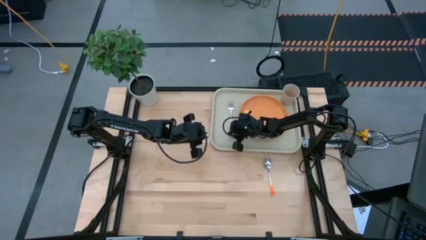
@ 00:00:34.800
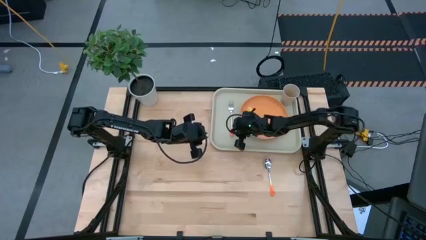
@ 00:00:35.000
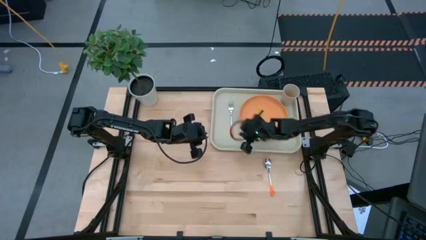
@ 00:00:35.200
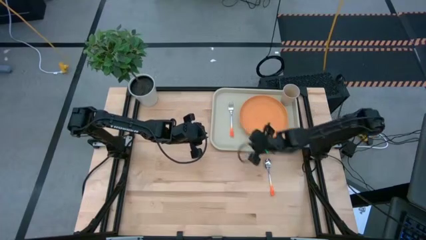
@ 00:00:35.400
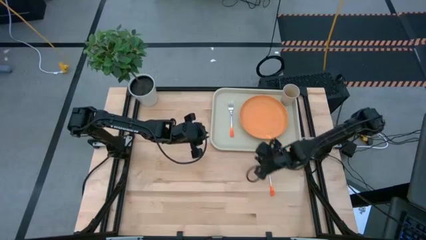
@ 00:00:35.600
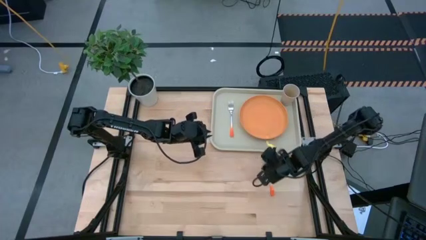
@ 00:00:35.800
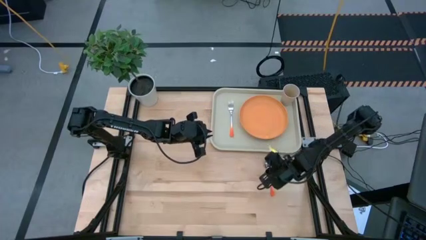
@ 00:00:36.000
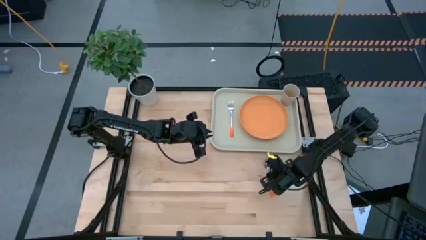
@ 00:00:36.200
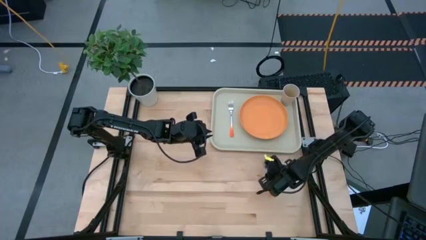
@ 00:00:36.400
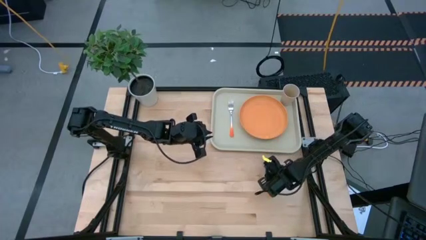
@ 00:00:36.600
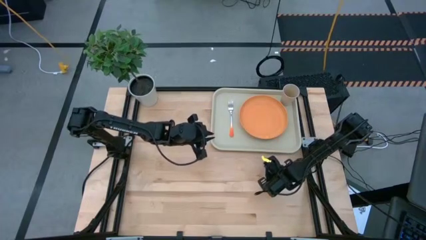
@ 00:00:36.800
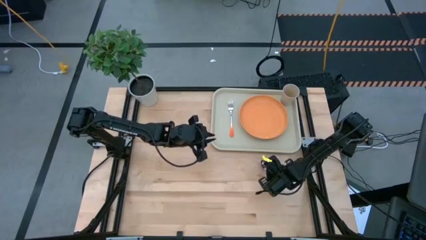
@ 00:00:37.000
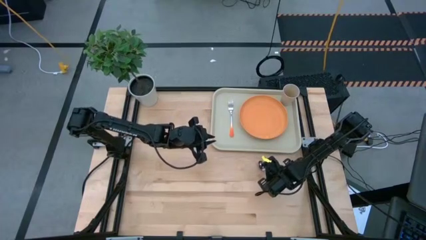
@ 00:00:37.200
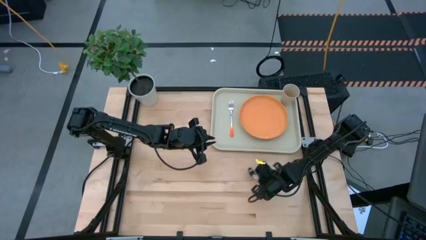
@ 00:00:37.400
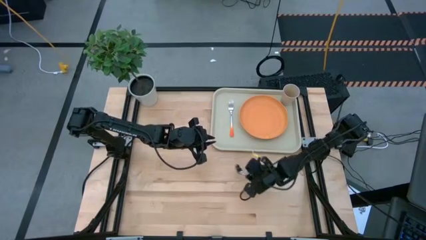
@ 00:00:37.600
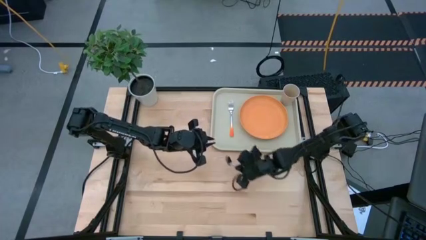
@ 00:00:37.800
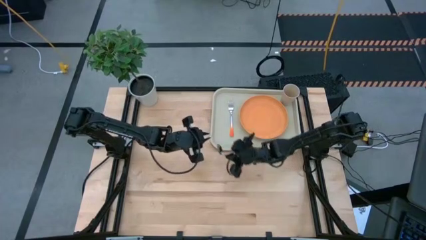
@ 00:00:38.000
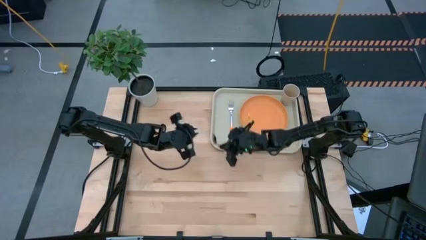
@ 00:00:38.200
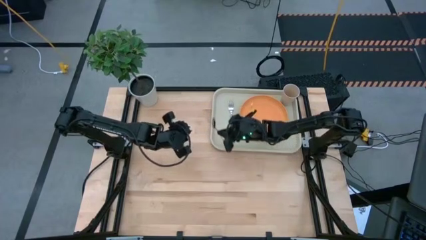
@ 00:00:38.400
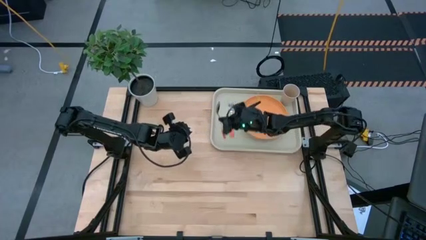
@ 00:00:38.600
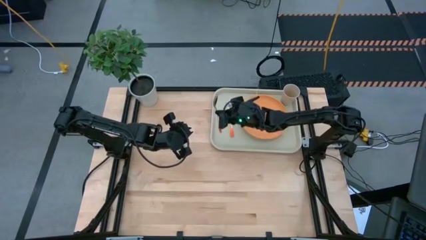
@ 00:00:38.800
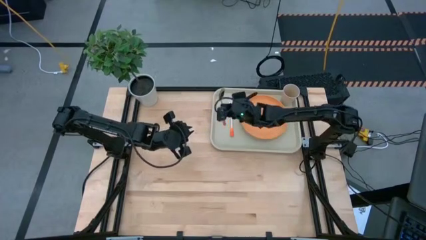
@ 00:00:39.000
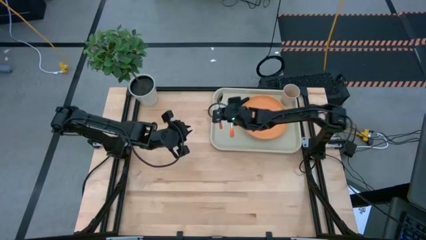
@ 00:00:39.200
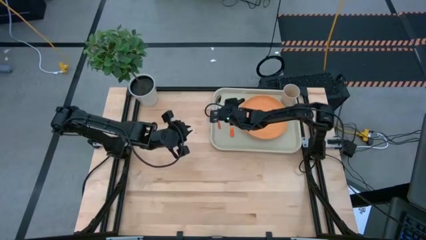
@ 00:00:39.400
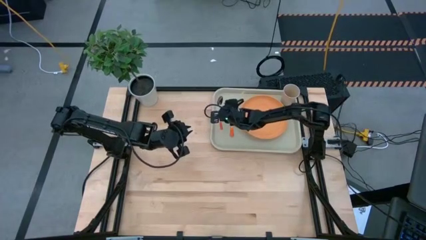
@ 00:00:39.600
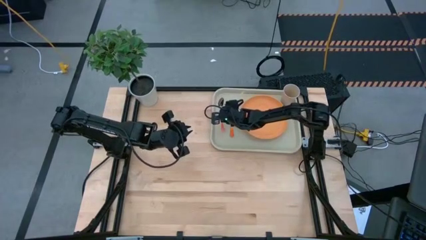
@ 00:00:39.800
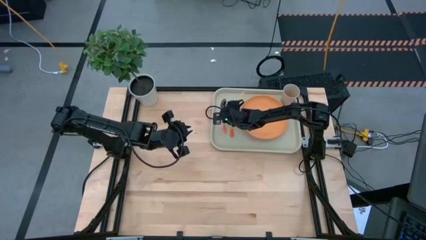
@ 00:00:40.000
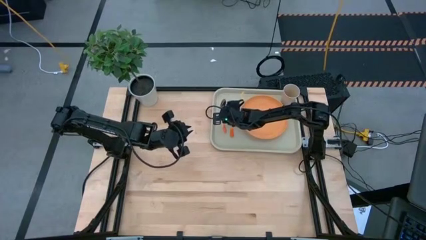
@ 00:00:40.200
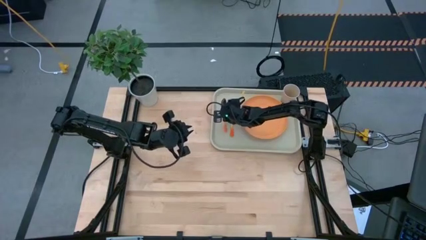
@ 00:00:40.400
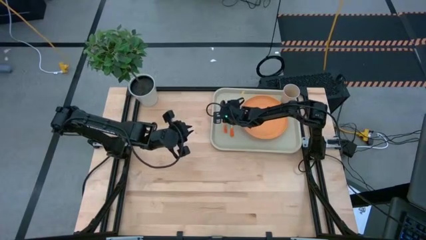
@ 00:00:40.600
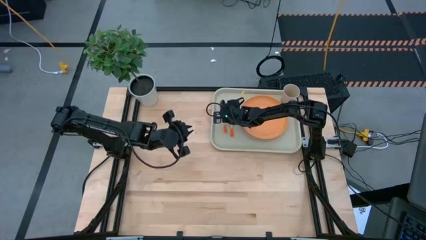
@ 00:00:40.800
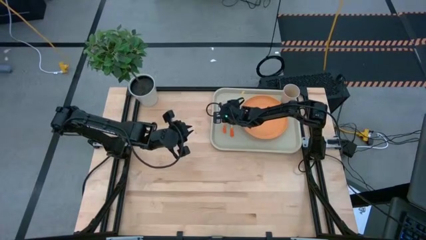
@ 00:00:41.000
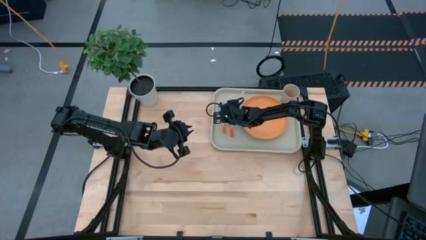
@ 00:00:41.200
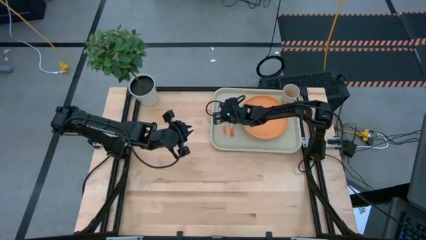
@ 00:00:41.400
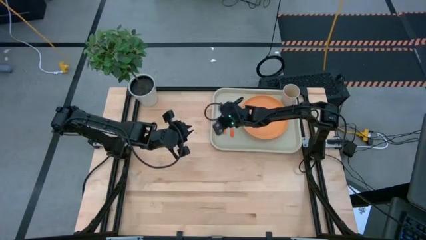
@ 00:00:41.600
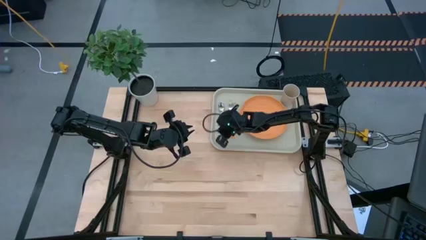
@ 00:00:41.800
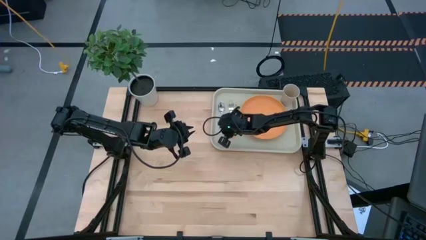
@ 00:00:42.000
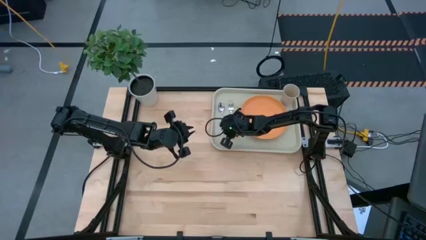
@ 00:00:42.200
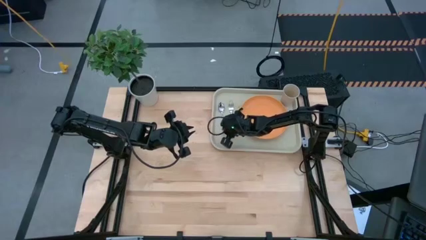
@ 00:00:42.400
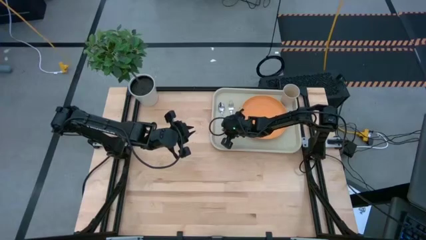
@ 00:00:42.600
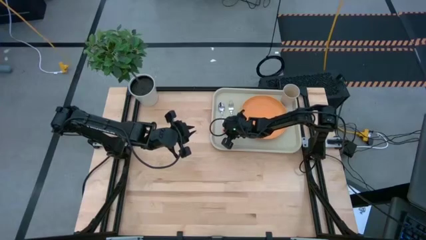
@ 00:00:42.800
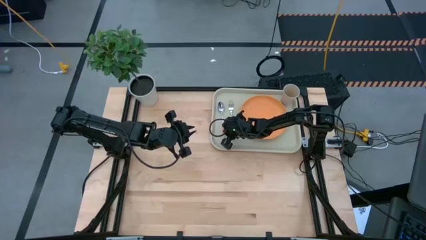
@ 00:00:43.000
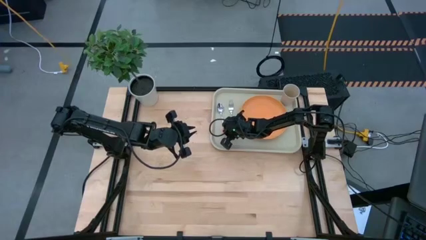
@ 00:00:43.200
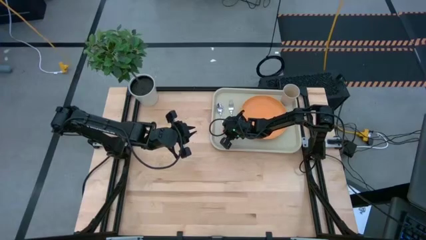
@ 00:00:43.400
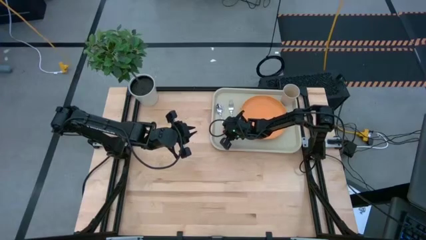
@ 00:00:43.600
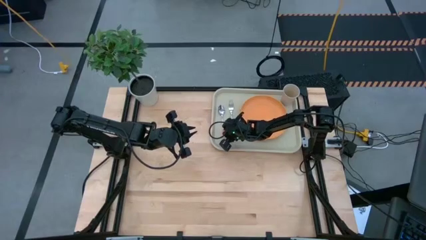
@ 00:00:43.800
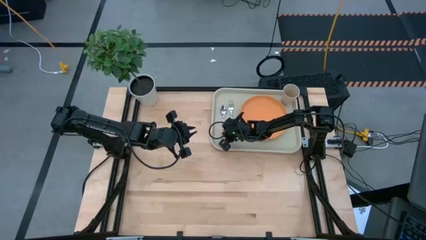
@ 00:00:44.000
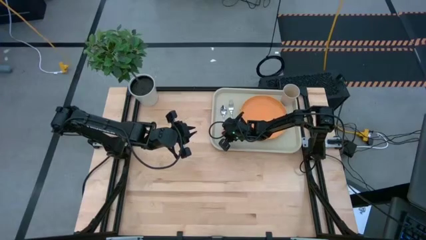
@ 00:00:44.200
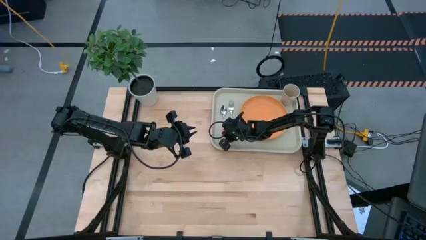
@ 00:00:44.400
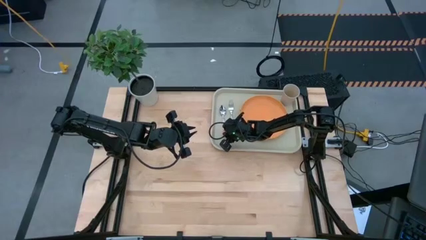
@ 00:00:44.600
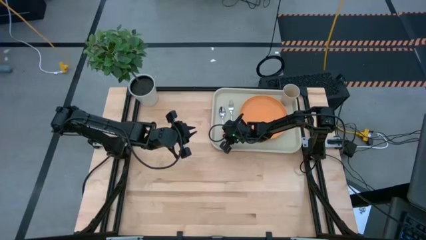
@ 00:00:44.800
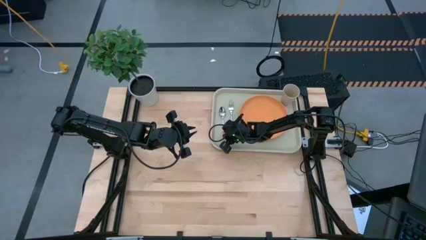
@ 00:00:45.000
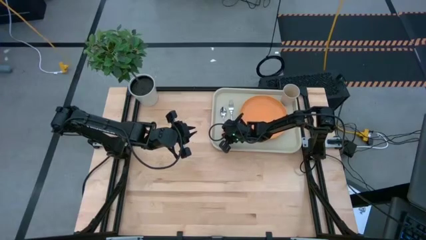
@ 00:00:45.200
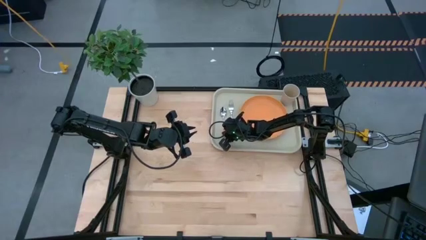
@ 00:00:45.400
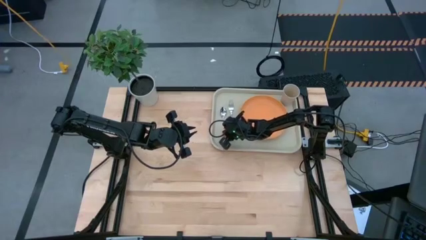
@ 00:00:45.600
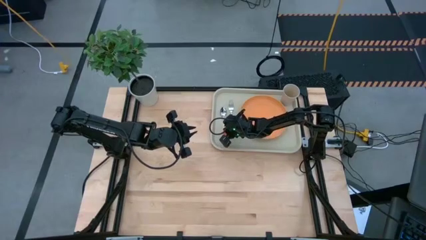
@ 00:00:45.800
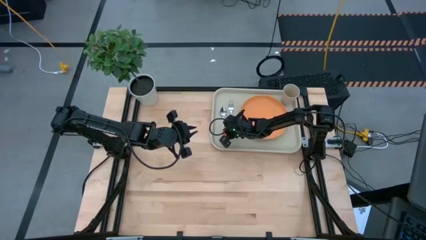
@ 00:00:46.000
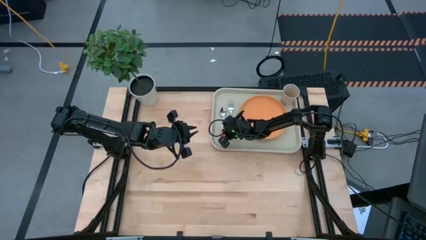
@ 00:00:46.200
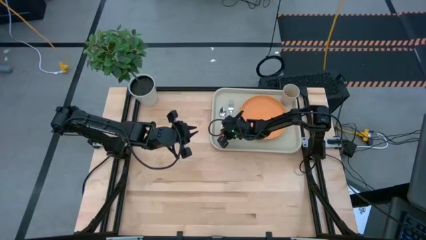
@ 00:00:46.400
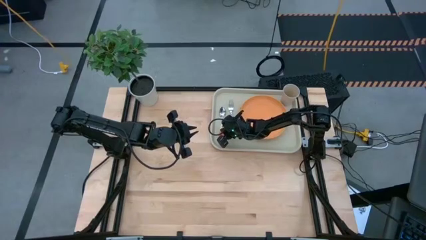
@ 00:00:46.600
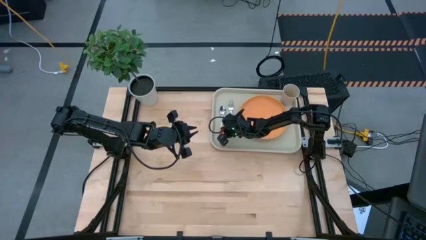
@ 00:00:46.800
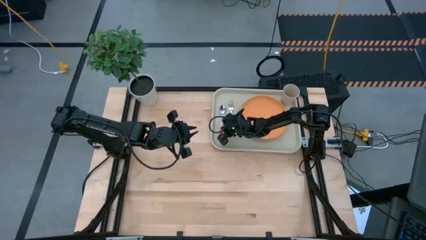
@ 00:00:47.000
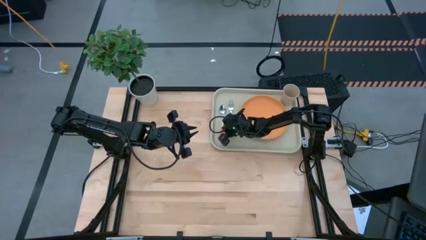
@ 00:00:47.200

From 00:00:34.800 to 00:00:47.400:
Task: Pick and place plate/cup/fork/spoon on tray
Put the orange spoon to the left of the orange fork on the gray tray
